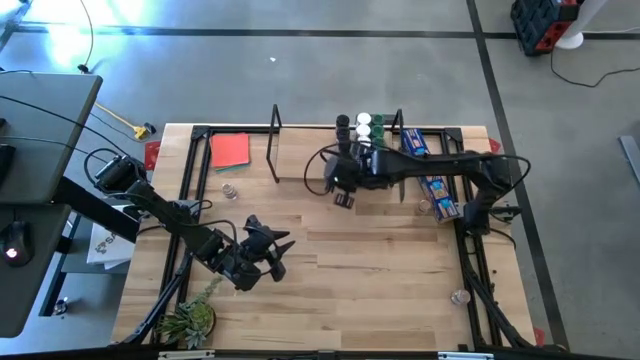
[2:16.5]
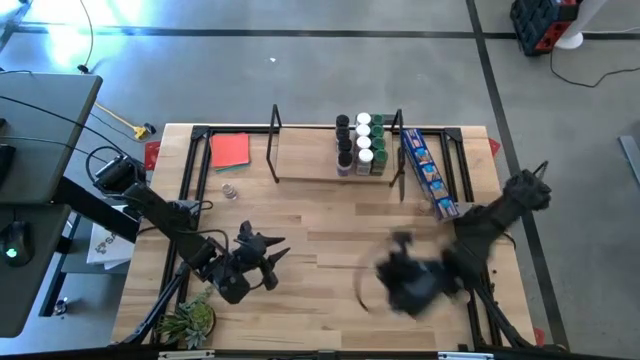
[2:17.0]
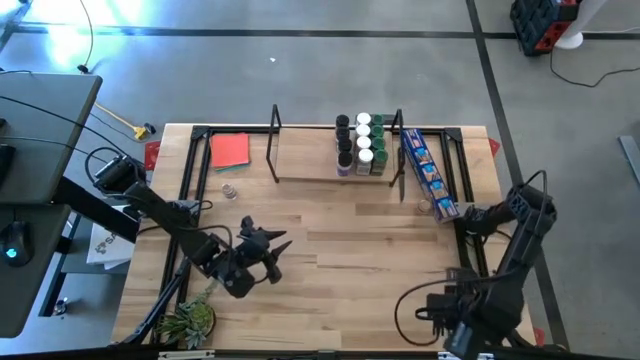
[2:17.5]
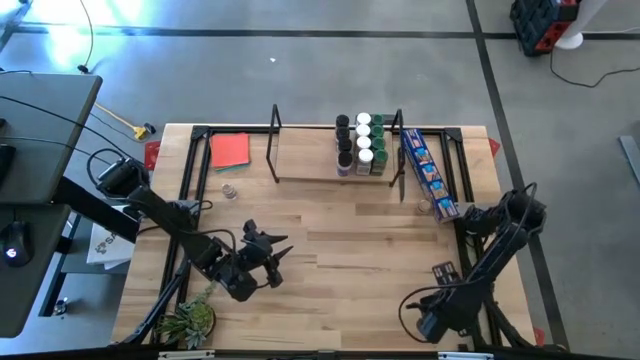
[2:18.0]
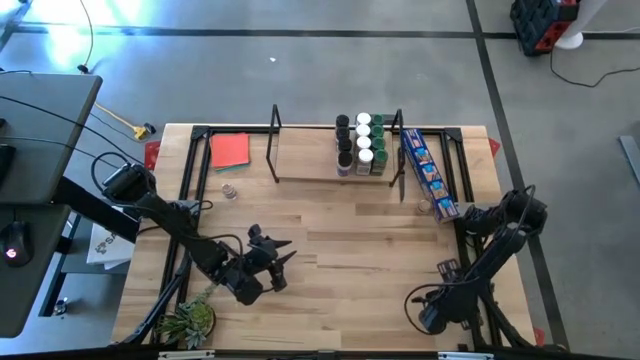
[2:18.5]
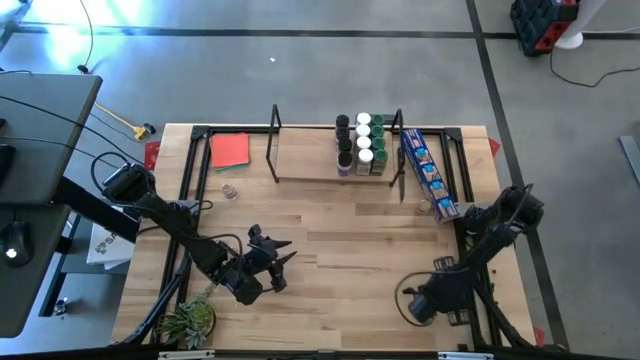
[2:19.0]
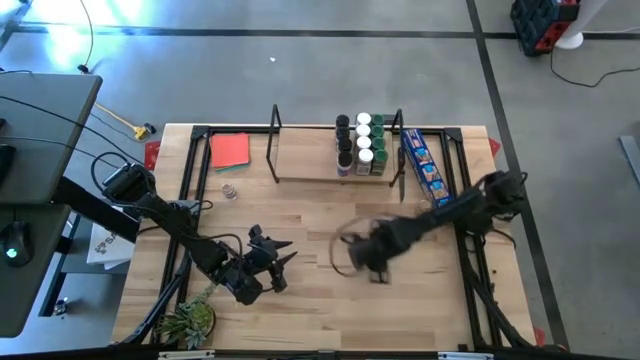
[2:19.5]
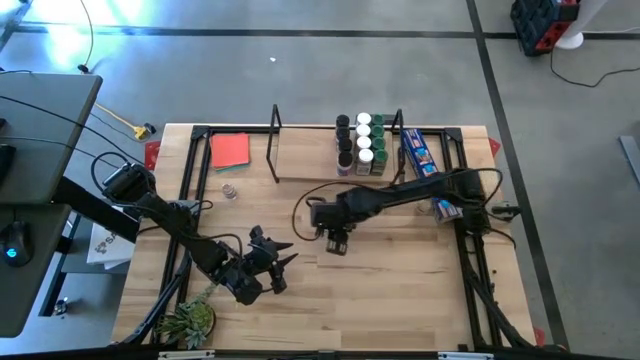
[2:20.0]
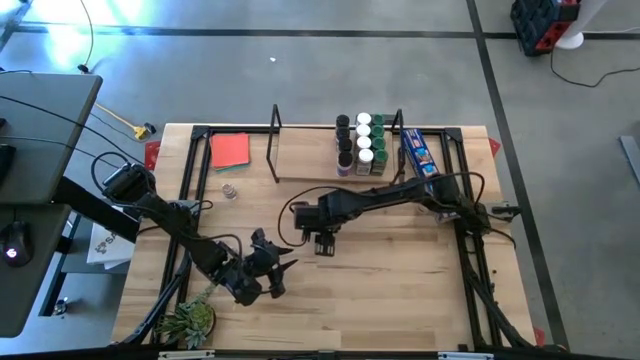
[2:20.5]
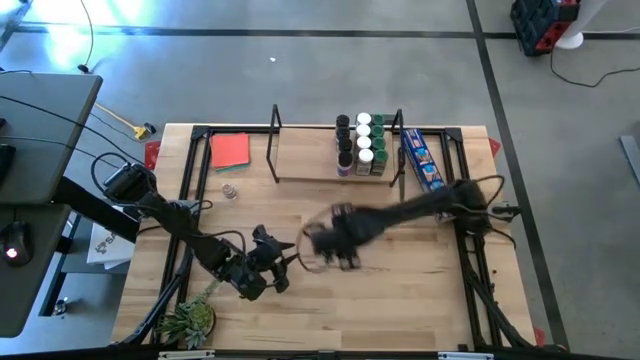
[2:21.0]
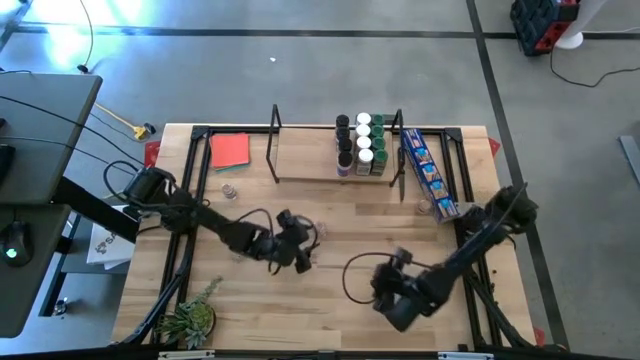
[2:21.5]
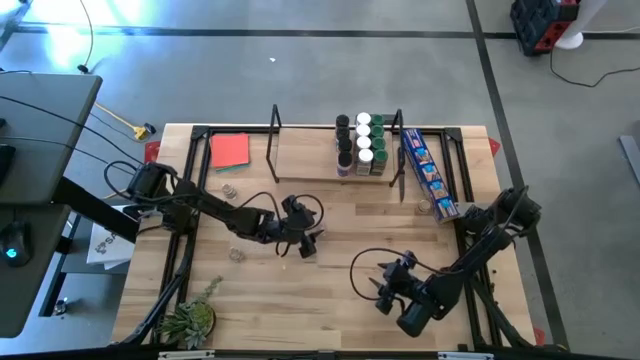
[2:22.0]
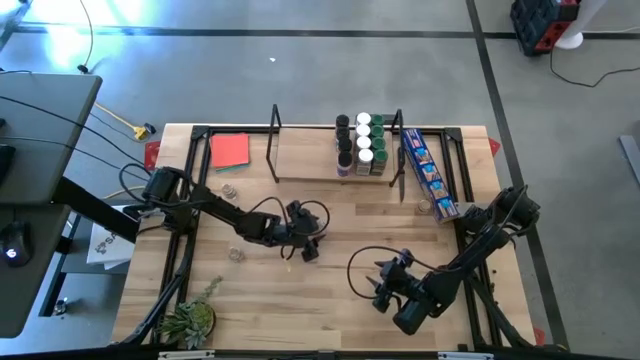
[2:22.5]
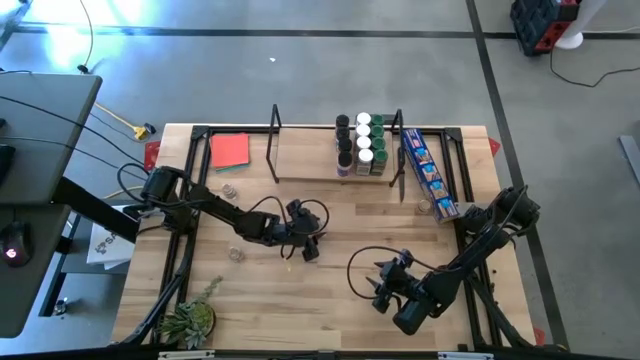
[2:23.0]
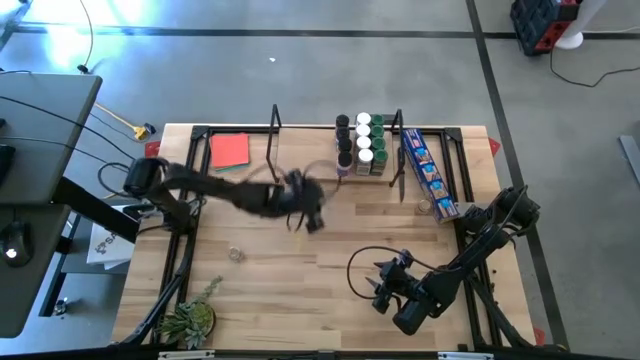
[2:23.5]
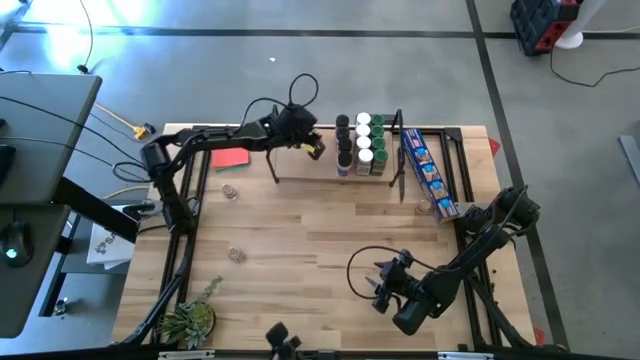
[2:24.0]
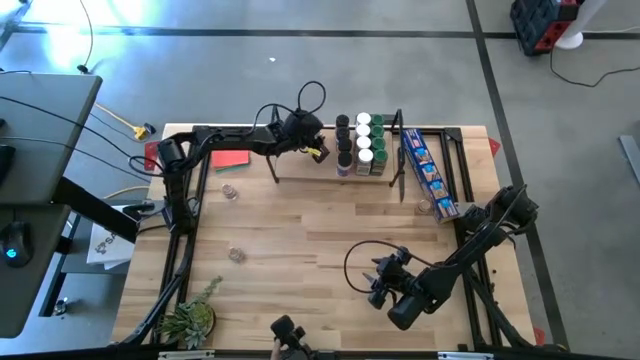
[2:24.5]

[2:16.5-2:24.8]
Task: Shelf spices
Put the bottom right brown seasoning bottle on the shelf

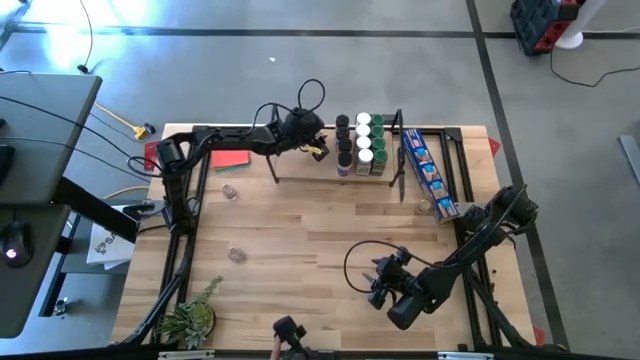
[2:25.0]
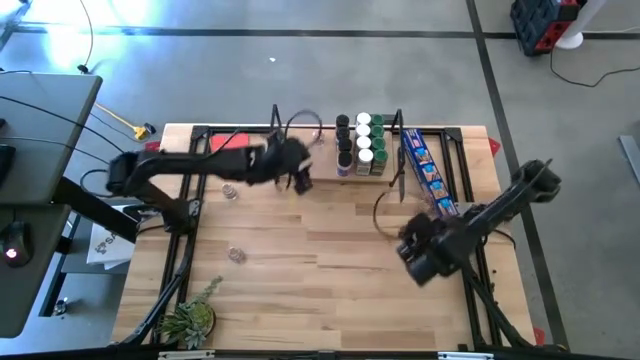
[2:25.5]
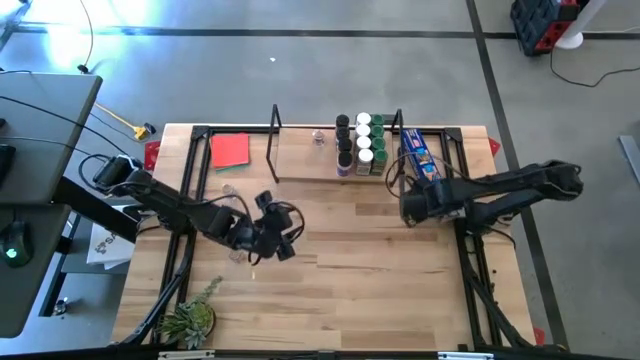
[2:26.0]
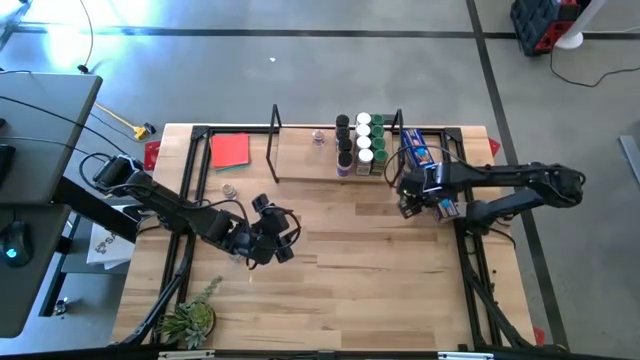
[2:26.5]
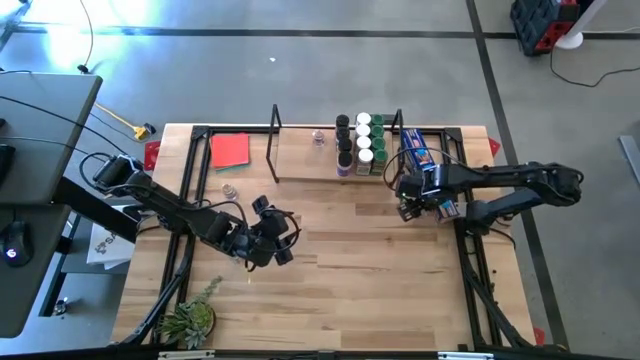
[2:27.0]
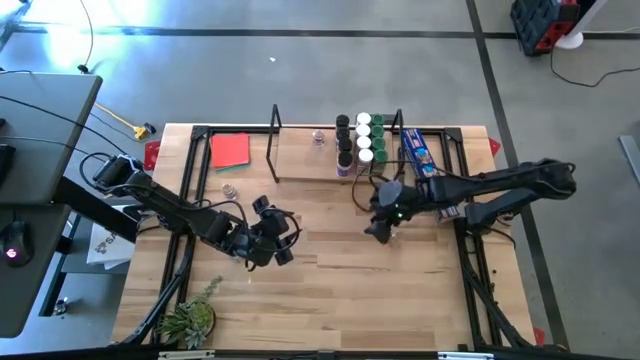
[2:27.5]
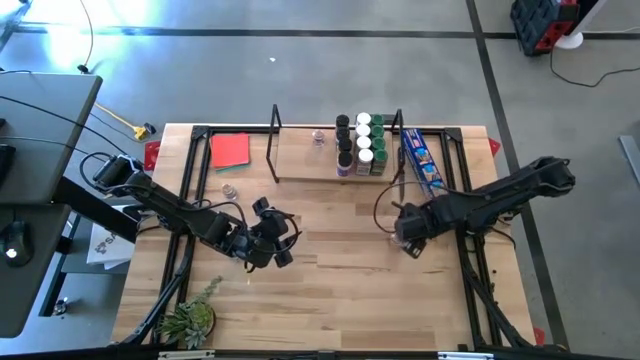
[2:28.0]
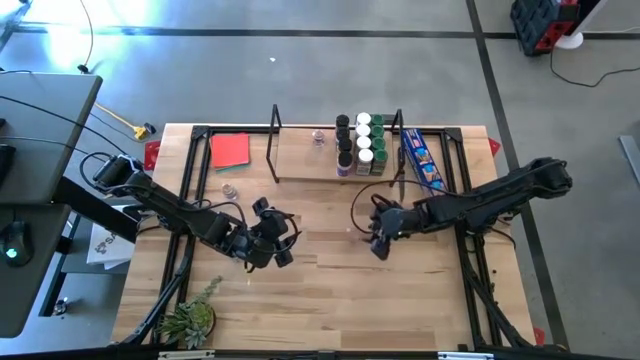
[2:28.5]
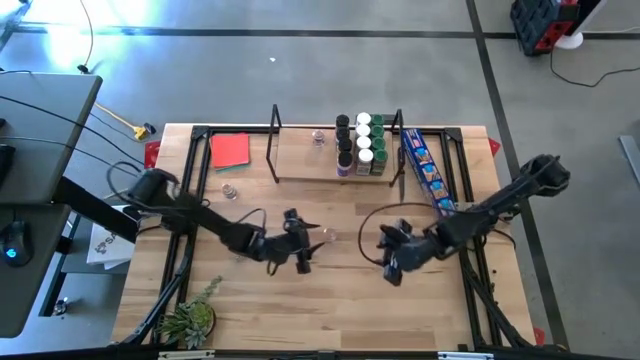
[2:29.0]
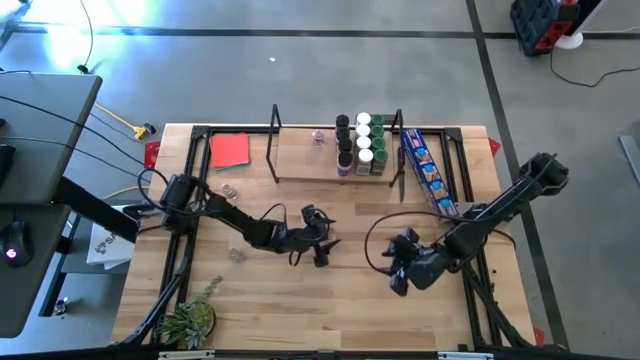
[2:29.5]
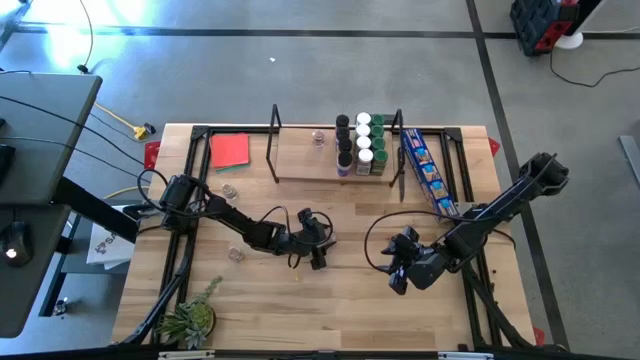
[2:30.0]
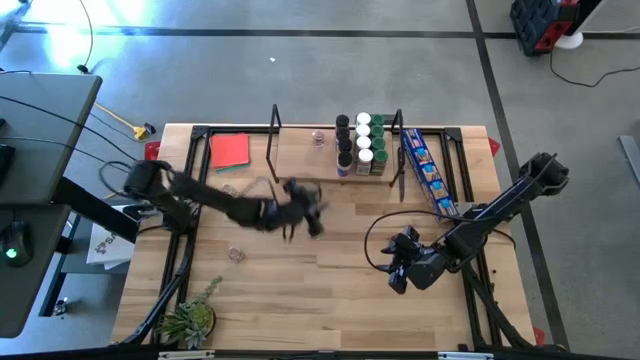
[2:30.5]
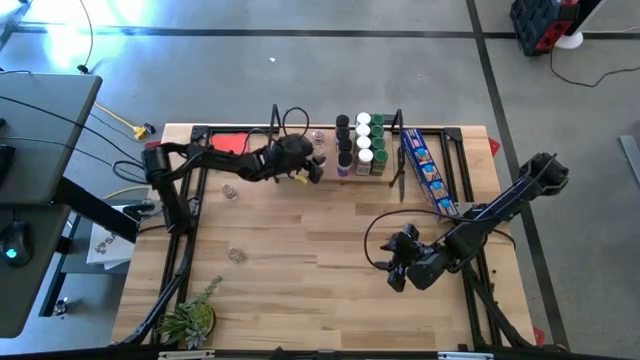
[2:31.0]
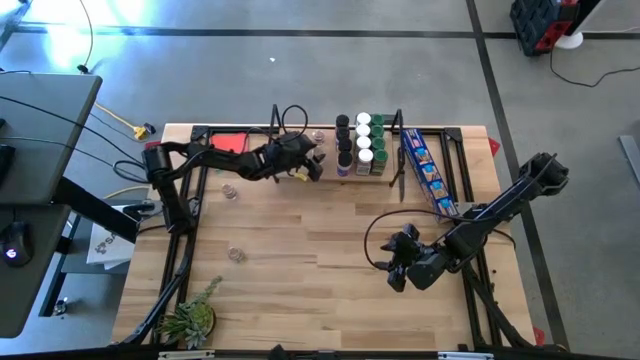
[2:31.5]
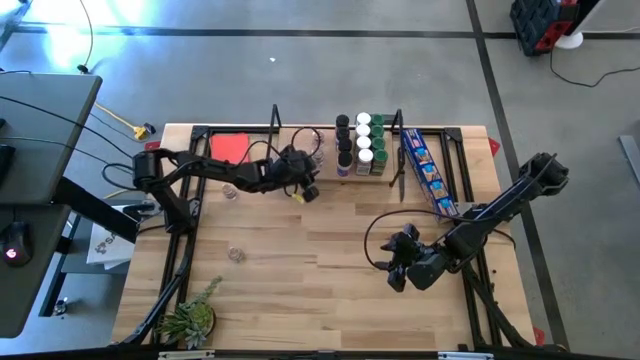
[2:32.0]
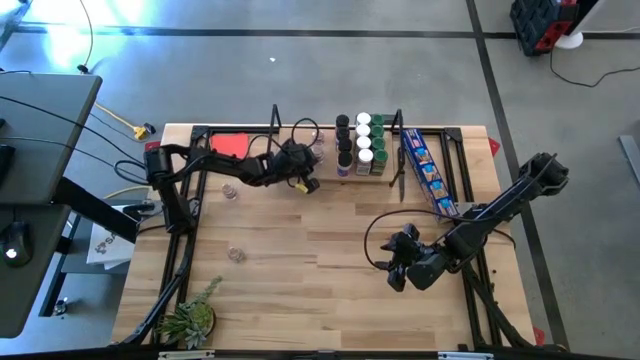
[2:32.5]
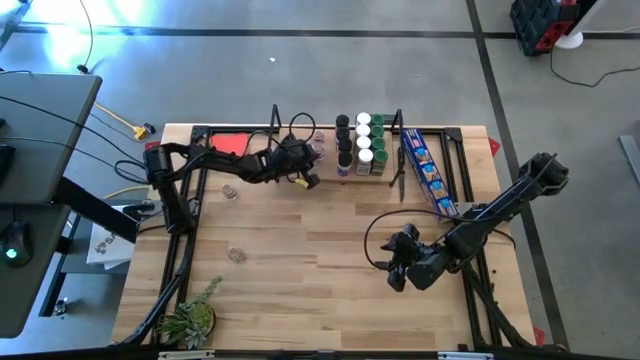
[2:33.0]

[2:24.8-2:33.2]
Put the top right brown seasoning bottle on the shelf aligned with the other brown seasoning bottle

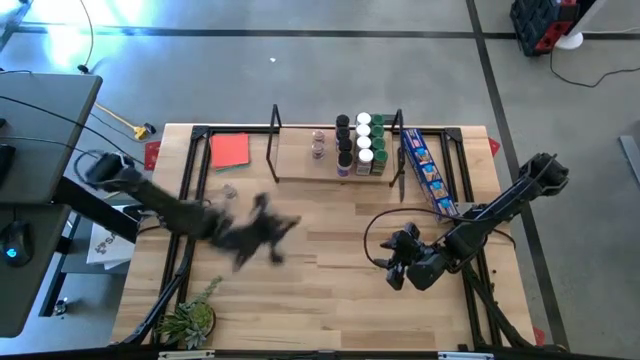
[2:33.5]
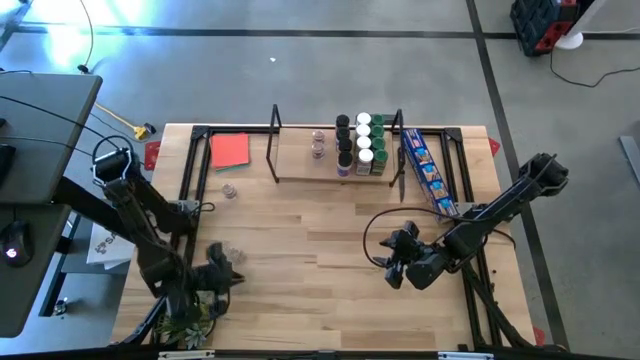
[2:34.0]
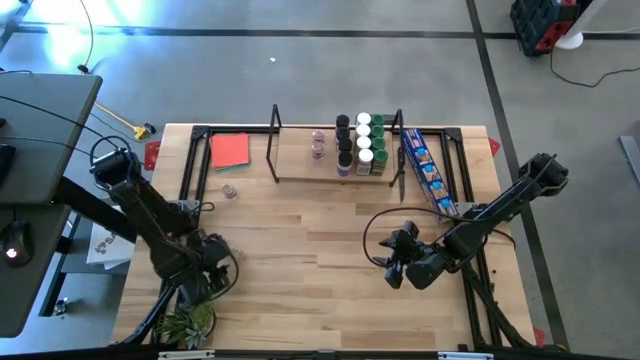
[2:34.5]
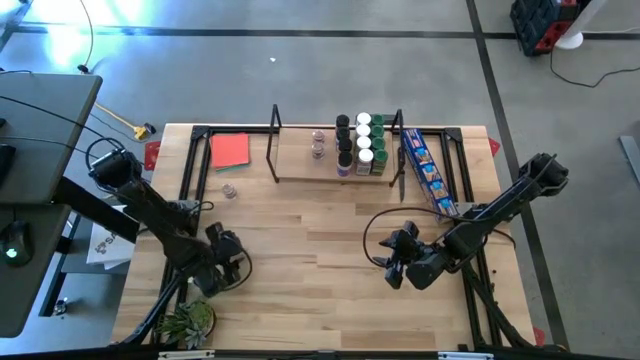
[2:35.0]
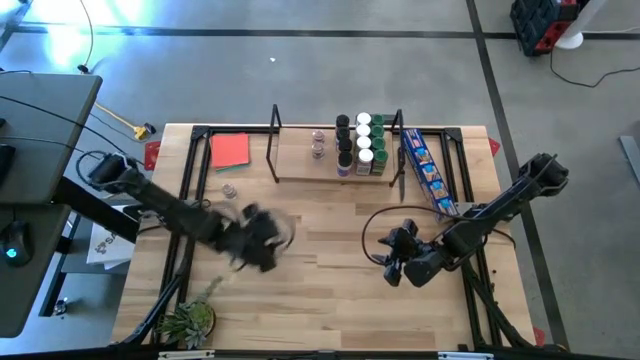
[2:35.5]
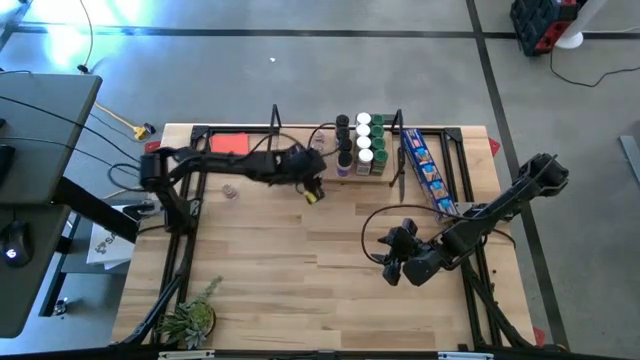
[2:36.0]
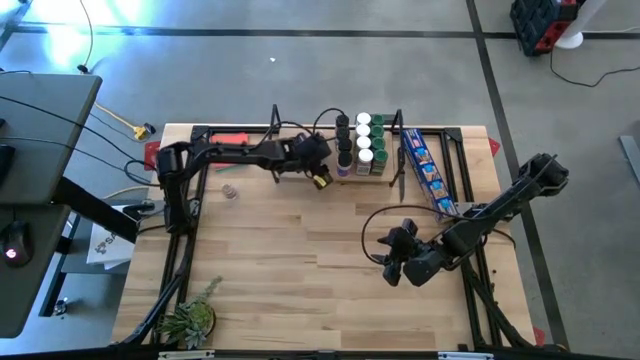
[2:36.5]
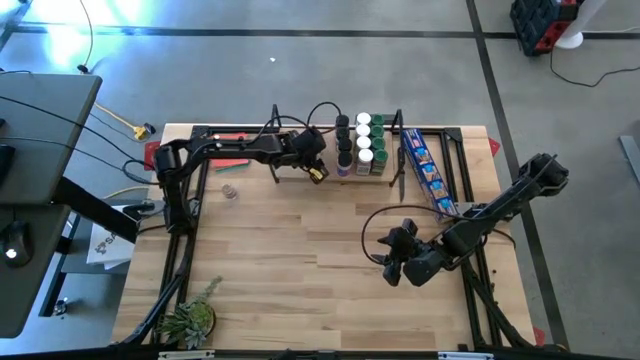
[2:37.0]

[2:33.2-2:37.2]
Put the bottom brown seasoning bottle on the shelf aligned with the other brown seasoning bottles

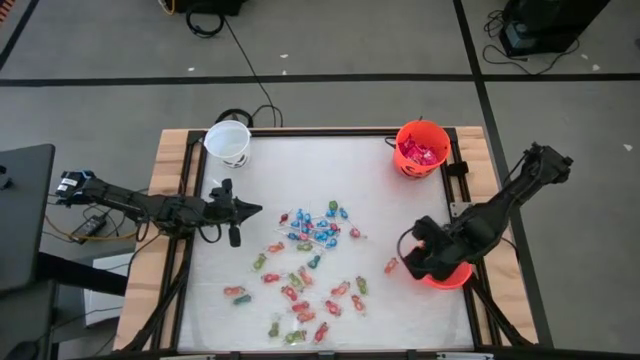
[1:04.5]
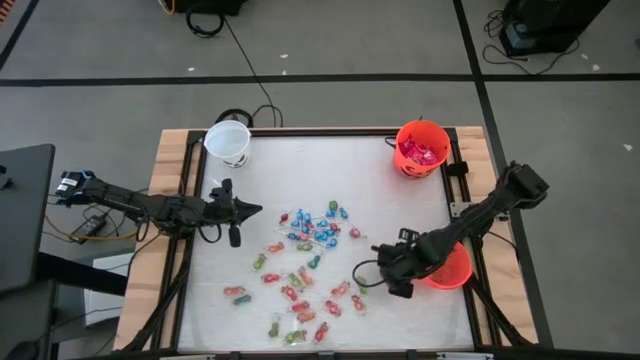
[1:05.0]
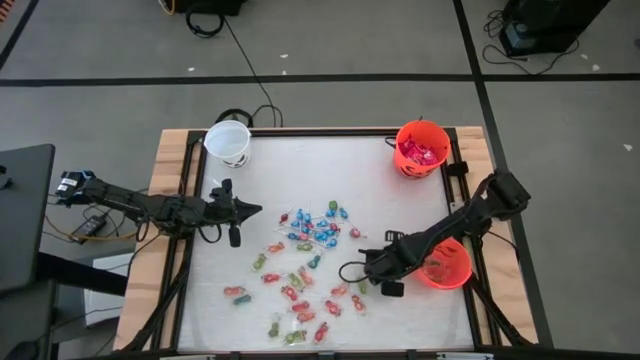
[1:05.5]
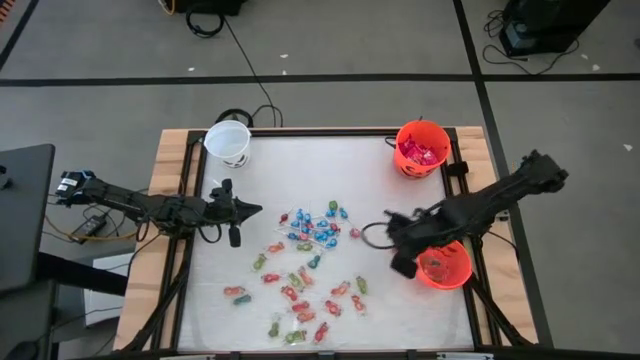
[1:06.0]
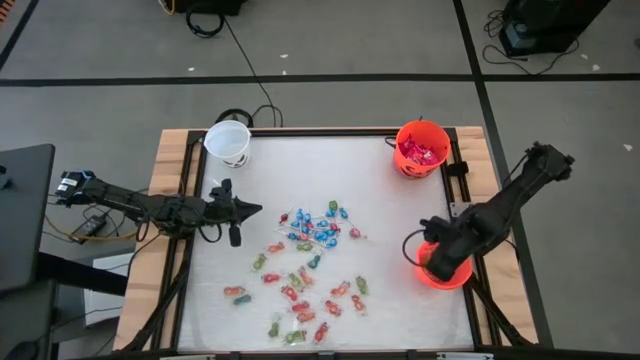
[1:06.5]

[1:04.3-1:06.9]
Task: Sort candy by brand, put in halloween buckets
Put the orange gummy into the bottom orange bucket
